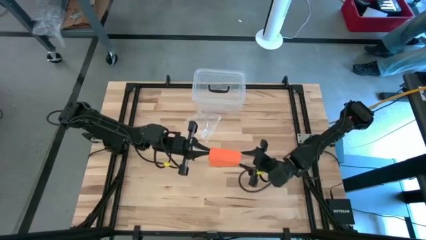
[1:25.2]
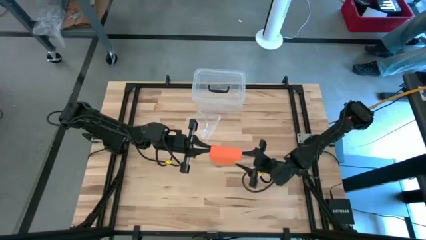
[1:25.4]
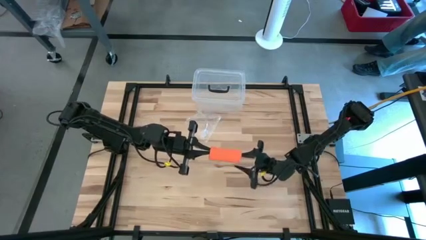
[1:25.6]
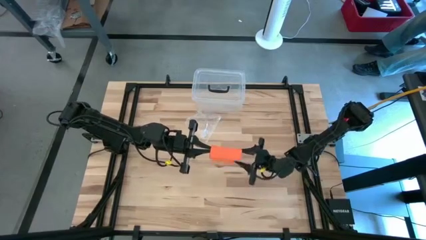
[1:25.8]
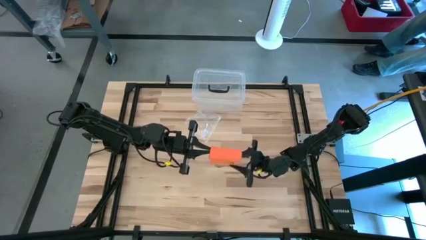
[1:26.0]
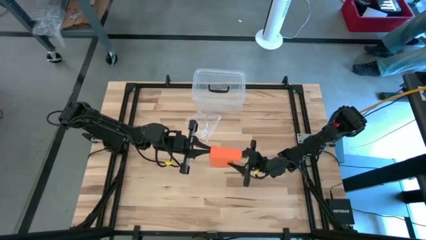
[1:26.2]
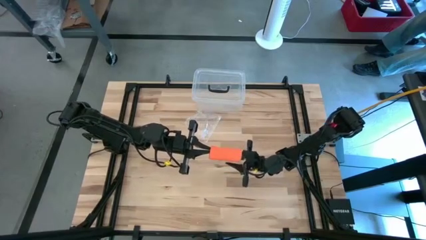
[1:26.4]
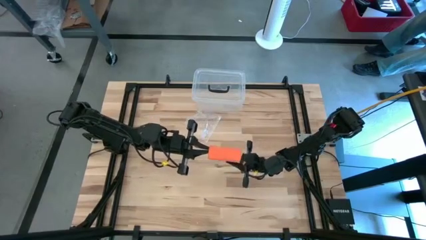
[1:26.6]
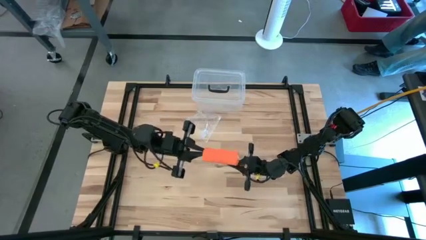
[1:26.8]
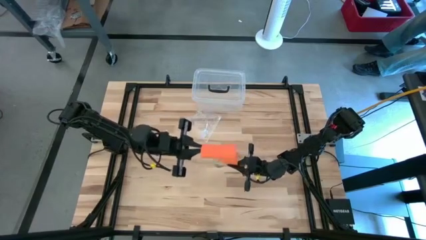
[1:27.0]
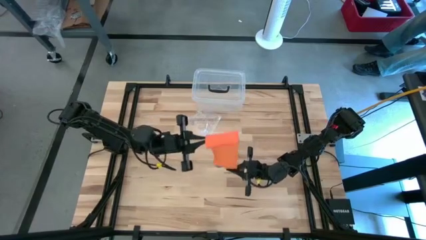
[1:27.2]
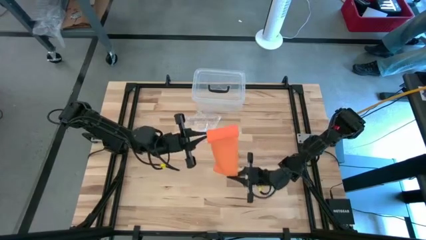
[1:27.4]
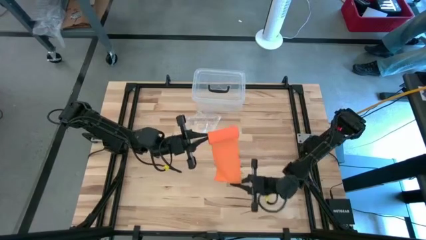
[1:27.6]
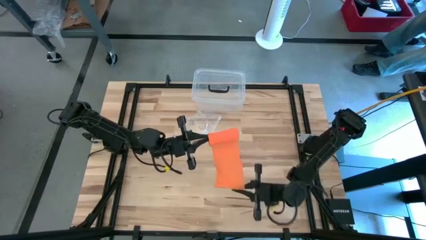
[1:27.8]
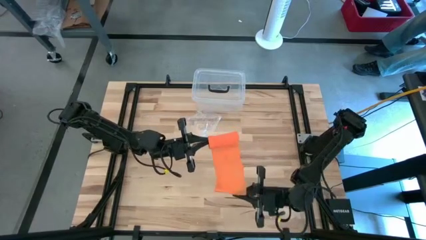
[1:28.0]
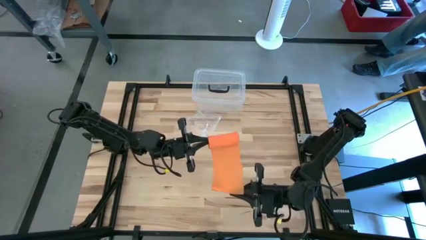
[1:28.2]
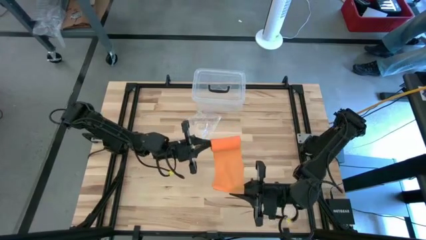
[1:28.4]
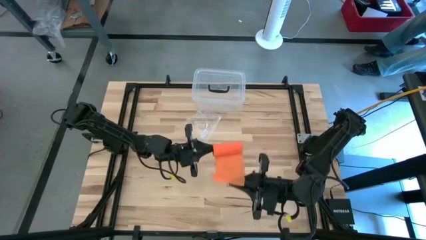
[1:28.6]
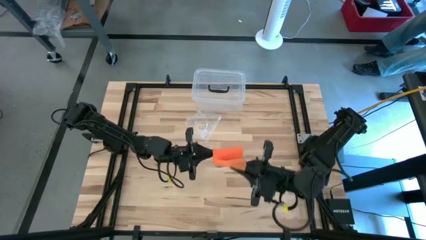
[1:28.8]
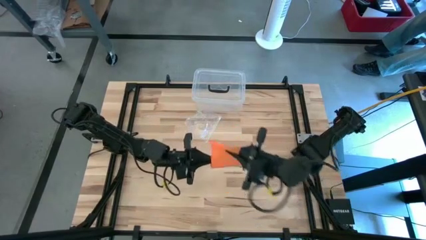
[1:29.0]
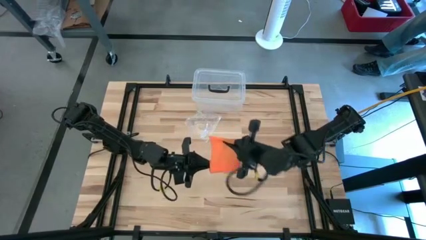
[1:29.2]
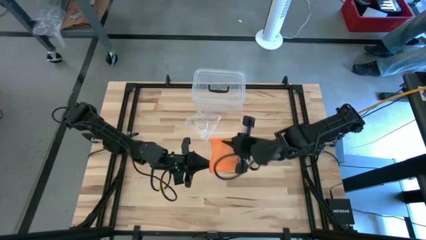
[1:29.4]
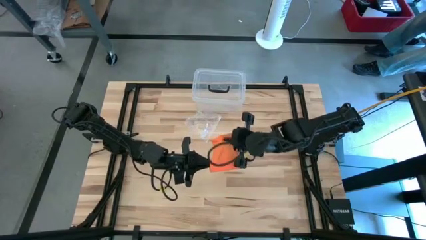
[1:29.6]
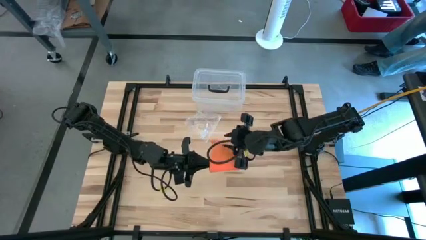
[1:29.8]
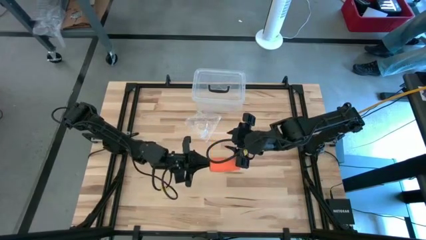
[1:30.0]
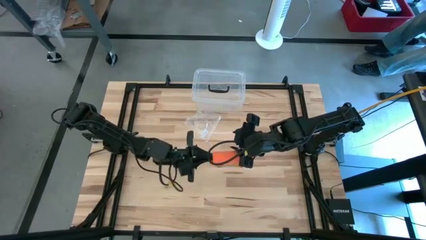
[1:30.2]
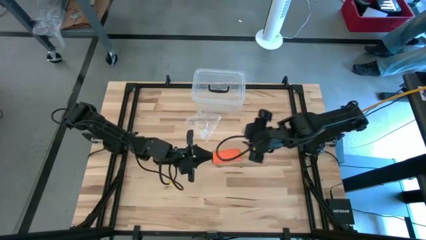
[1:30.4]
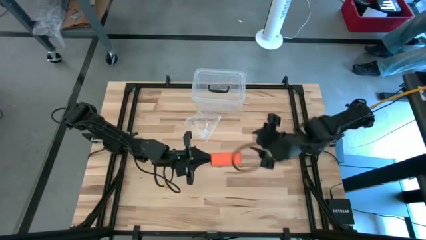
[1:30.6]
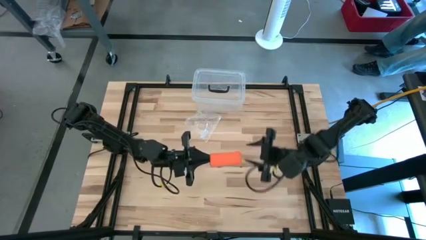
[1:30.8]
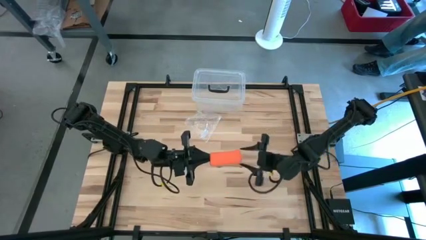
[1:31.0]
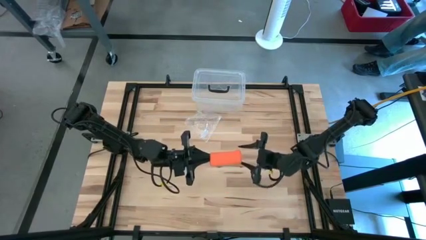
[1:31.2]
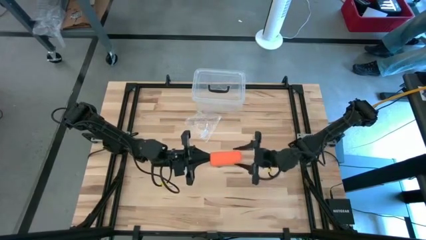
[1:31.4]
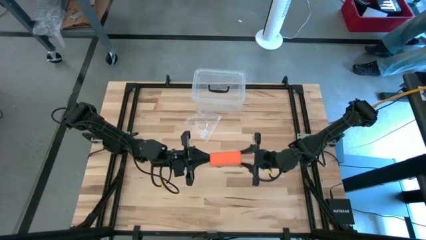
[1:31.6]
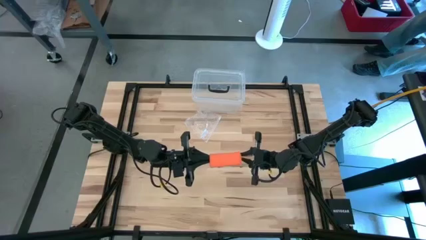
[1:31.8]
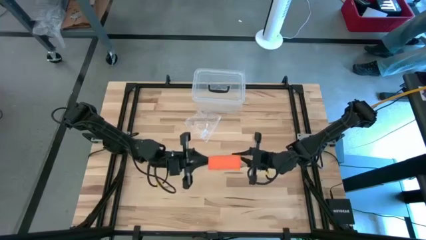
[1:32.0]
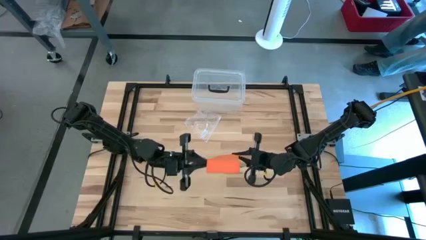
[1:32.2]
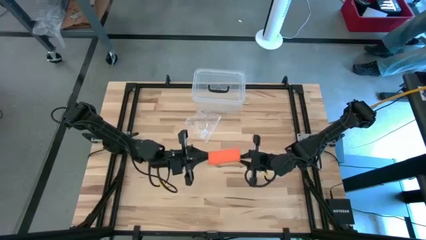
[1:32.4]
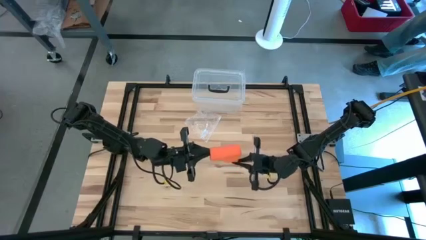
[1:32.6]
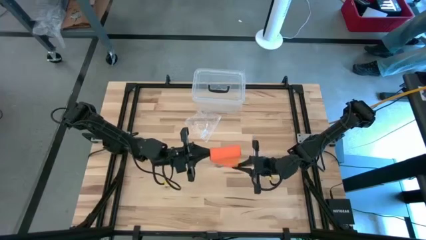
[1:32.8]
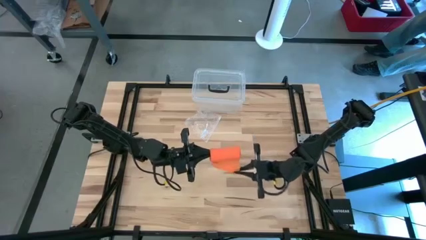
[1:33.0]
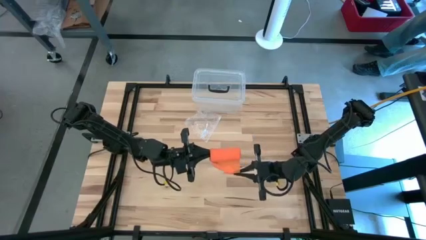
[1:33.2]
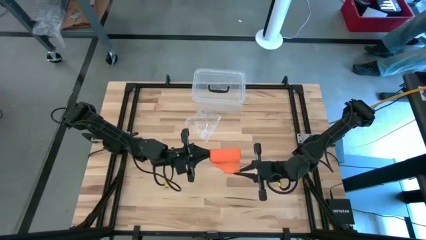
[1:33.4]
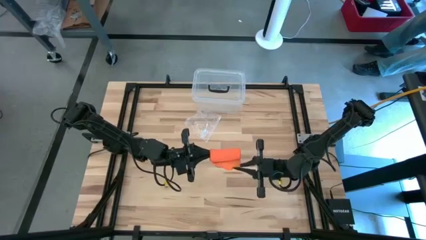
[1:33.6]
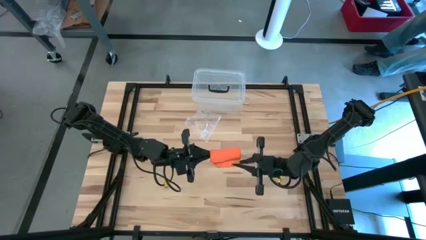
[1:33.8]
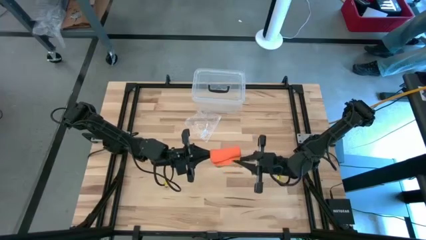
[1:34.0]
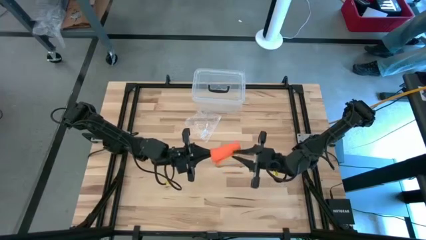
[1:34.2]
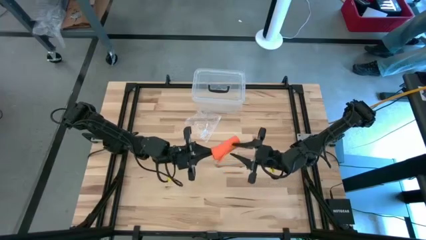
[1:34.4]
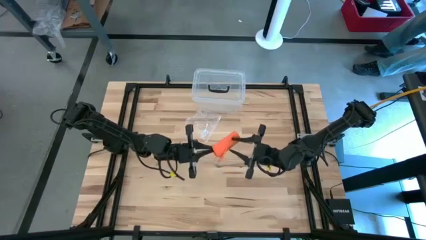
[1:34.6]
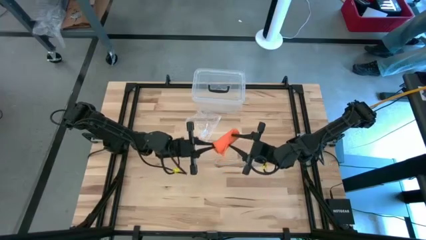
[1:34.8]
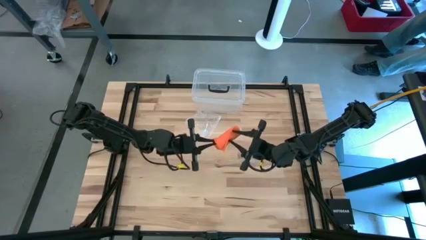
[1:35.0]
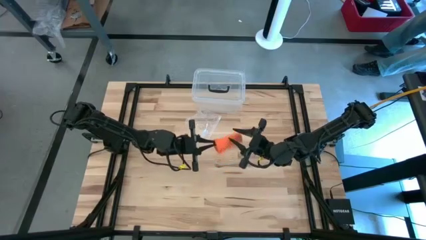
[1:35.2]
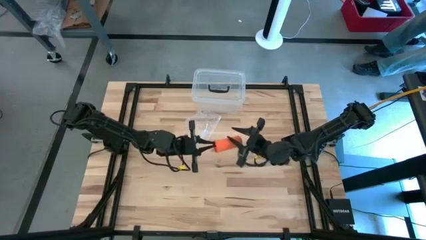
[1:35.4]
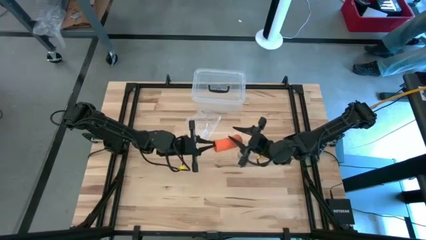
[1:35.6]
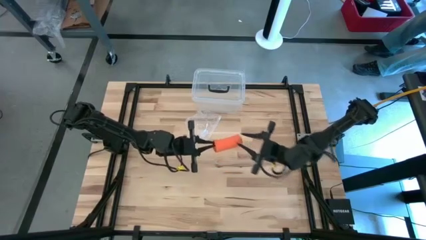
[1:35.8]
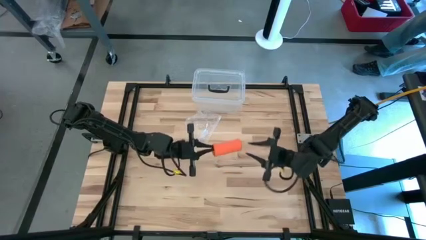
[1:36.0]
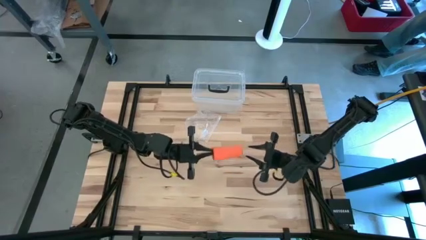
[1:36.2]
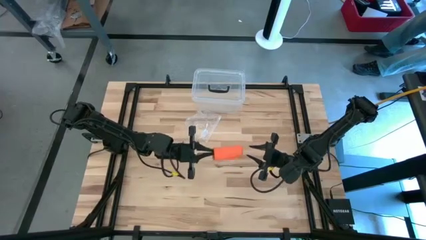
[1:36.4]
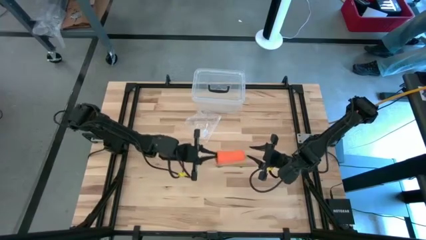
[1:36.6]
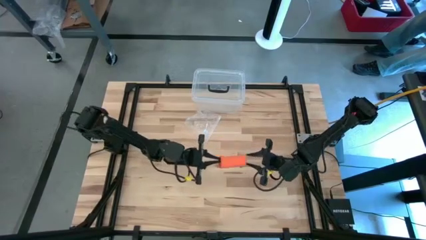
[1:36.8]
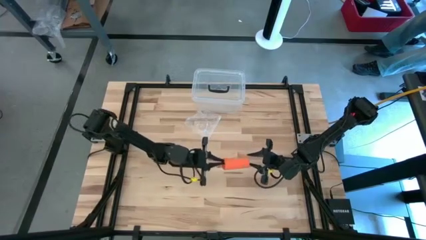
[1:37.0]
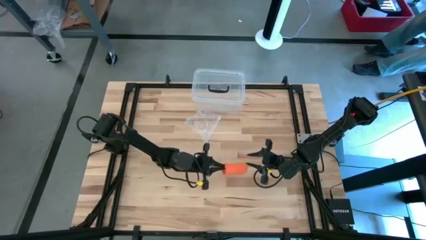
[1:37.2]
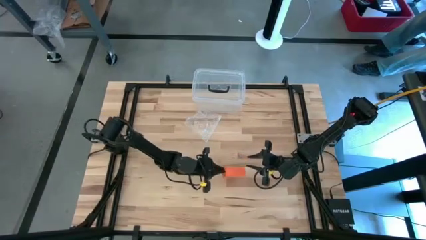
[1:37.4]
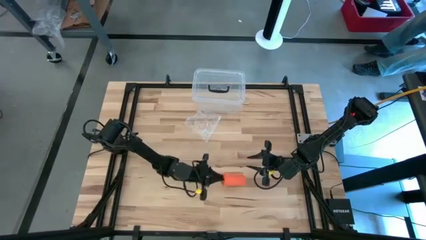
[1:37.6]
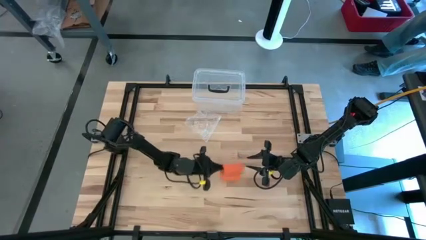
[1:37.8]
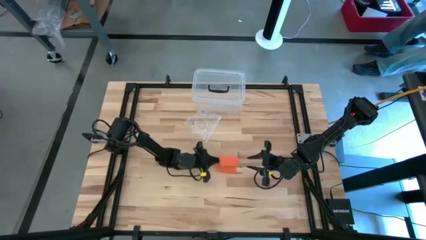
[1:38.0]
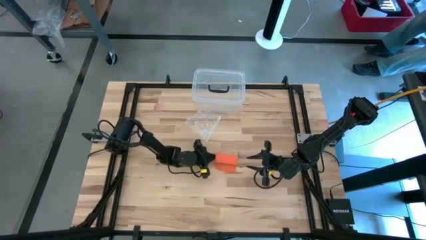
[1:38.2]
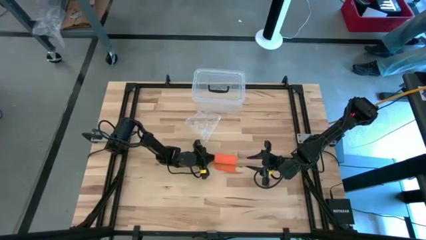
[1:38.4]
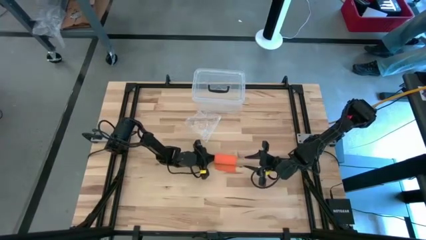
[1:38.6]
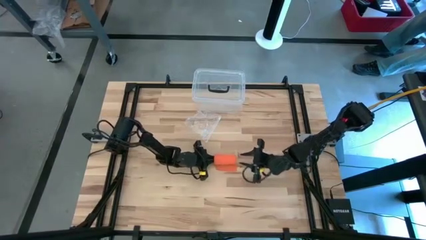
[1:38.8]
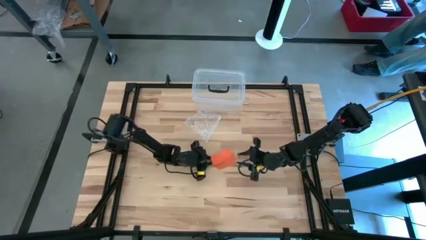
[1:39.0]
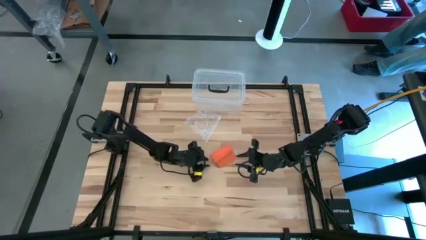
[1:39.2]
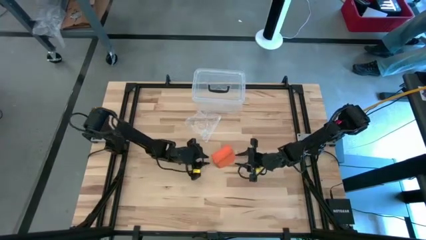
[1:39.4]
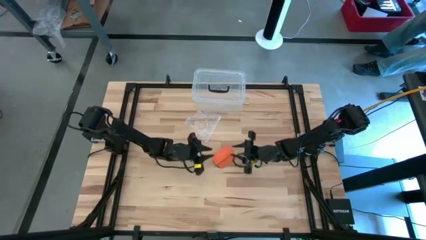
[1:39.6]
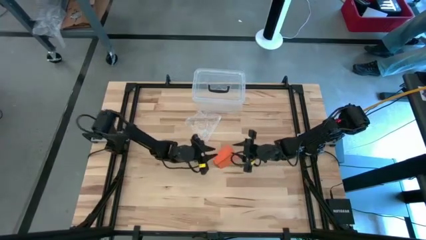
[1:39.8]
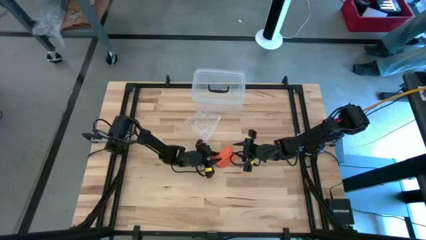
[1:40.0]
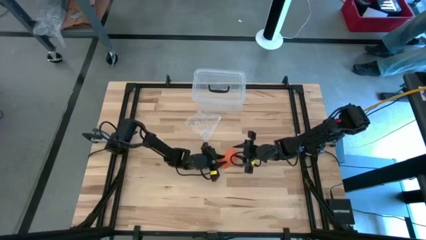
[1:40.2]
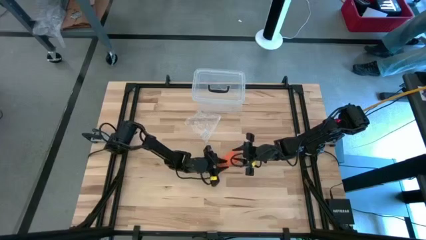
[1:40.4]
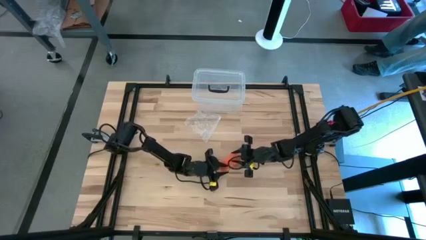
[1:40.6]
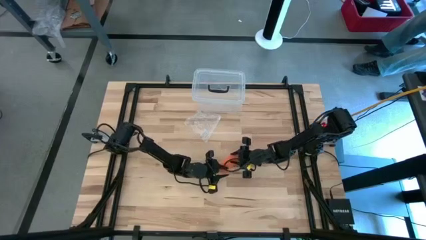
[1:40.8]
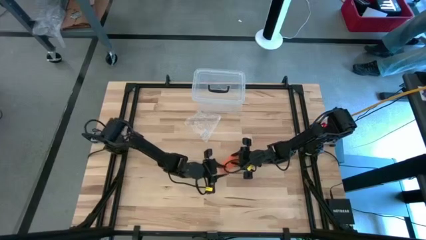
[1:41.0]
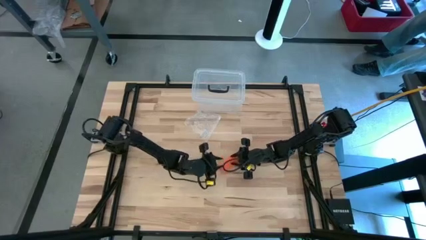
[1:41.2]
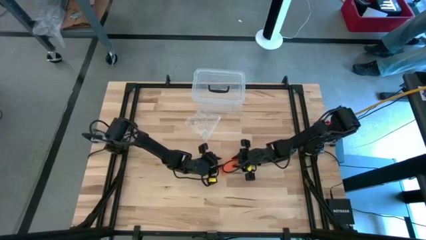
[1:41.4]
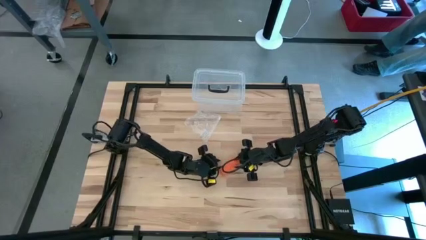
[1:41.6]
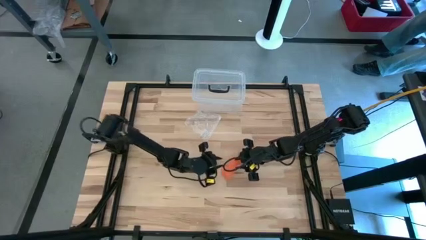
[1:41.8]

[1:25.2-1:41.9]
Task: Roll bandage
Roll the orange bandage
